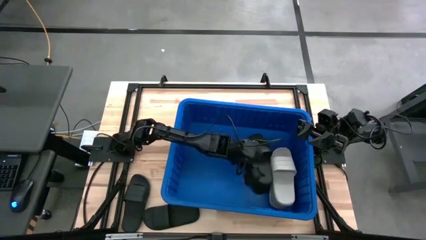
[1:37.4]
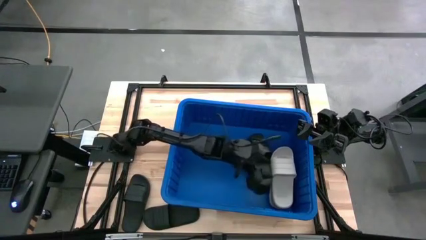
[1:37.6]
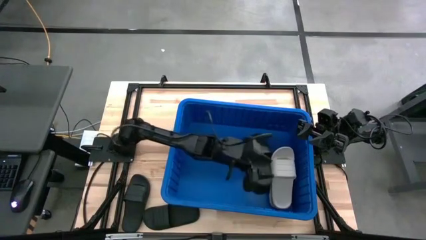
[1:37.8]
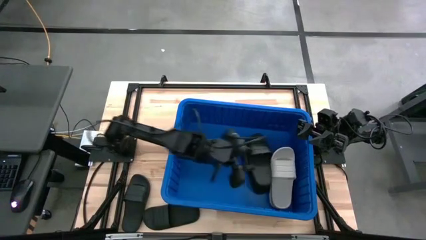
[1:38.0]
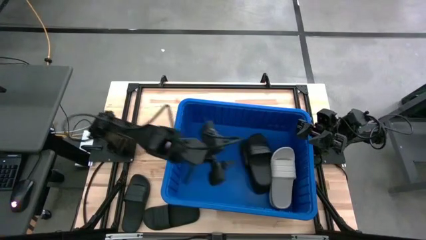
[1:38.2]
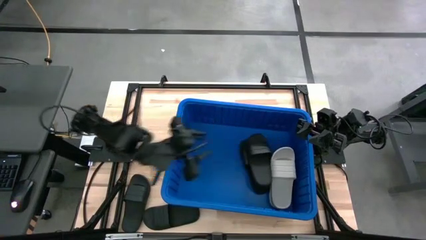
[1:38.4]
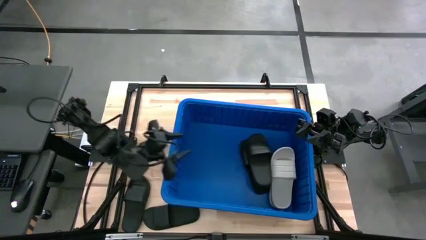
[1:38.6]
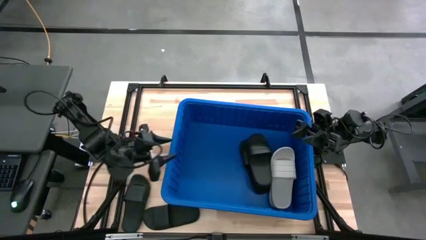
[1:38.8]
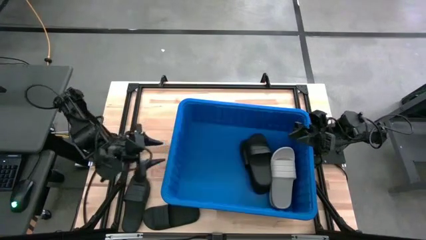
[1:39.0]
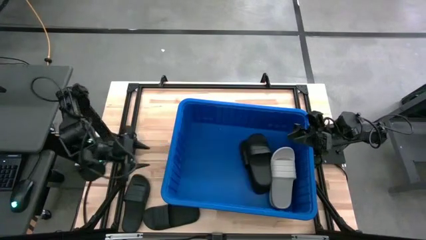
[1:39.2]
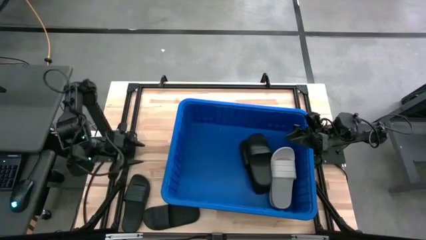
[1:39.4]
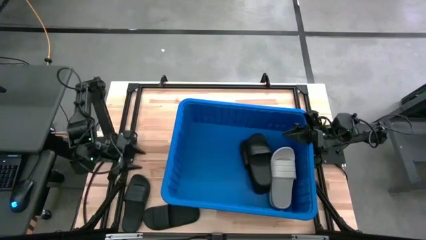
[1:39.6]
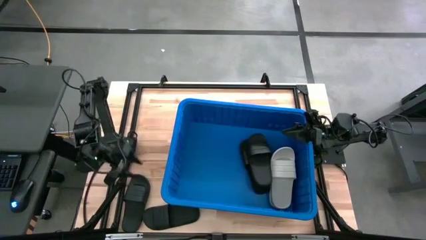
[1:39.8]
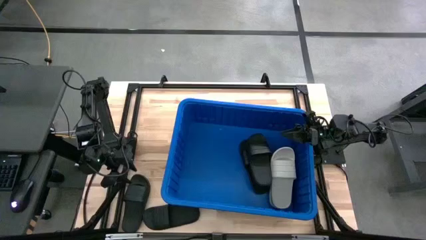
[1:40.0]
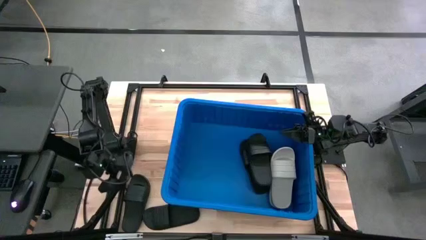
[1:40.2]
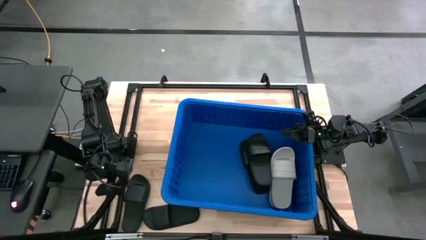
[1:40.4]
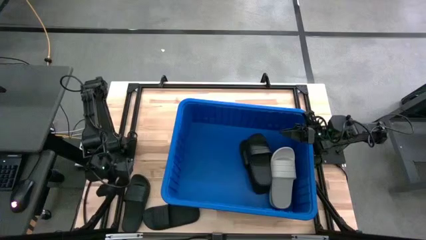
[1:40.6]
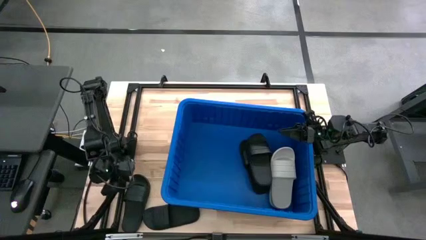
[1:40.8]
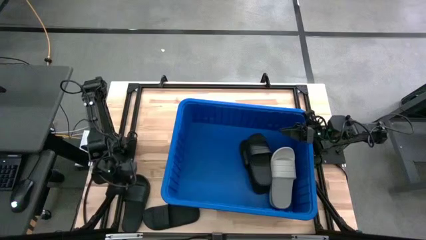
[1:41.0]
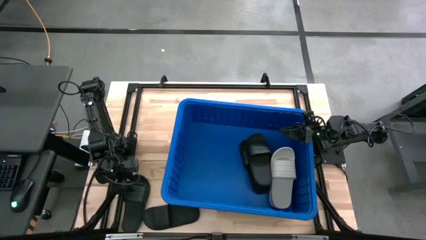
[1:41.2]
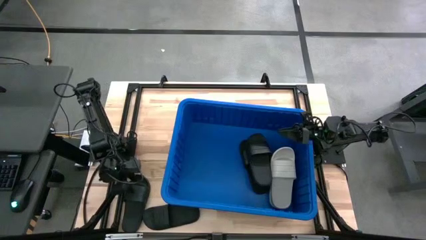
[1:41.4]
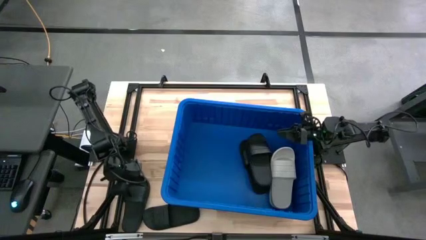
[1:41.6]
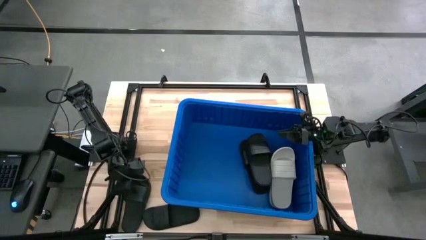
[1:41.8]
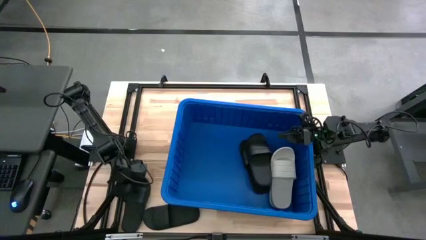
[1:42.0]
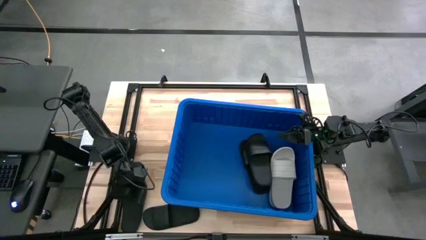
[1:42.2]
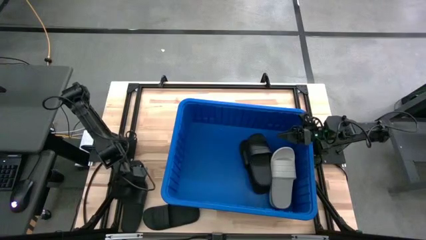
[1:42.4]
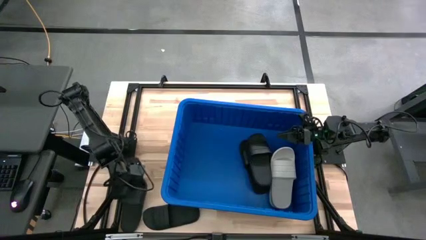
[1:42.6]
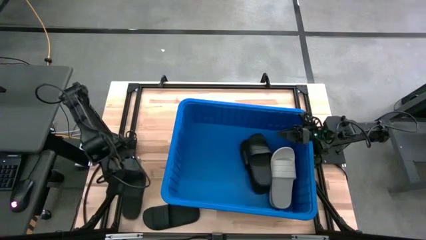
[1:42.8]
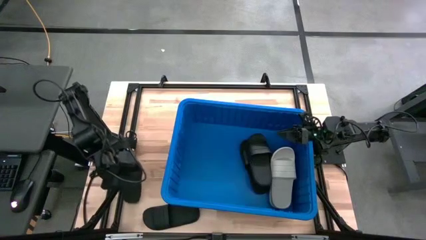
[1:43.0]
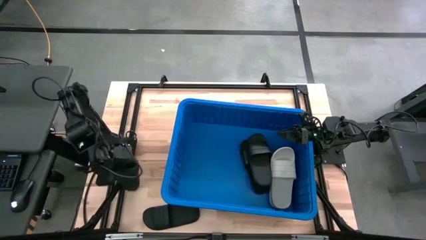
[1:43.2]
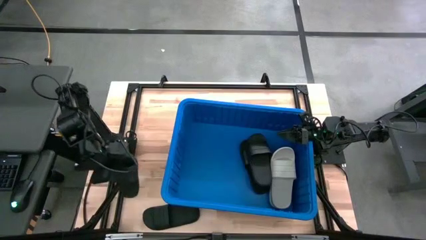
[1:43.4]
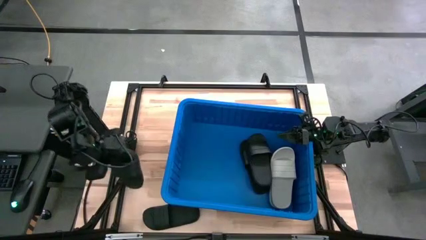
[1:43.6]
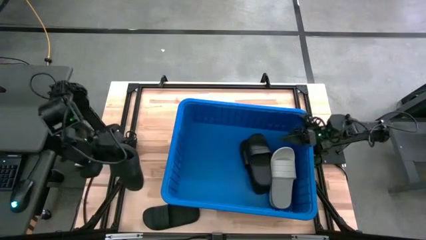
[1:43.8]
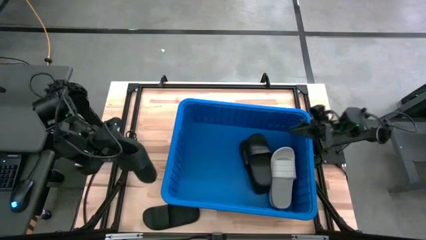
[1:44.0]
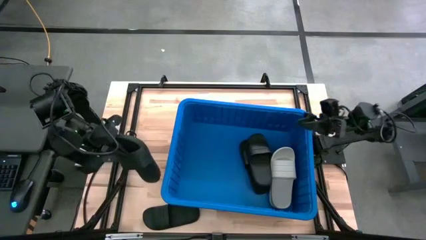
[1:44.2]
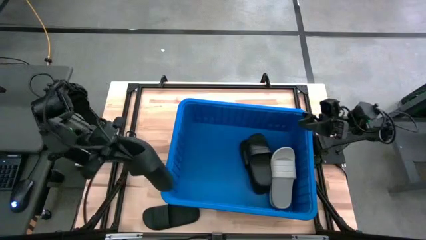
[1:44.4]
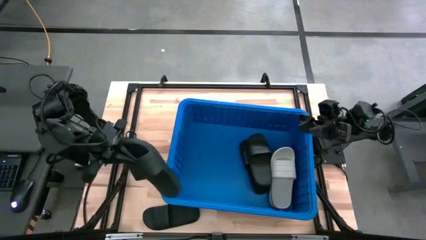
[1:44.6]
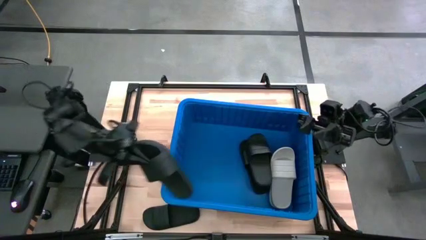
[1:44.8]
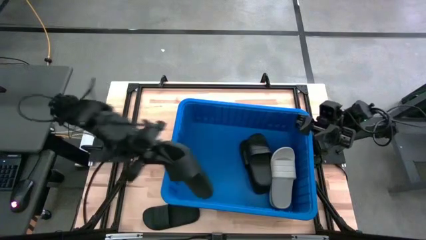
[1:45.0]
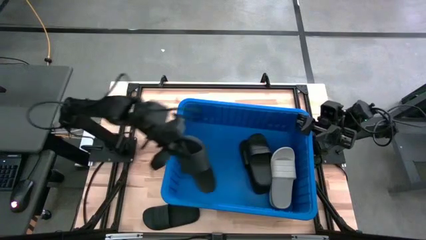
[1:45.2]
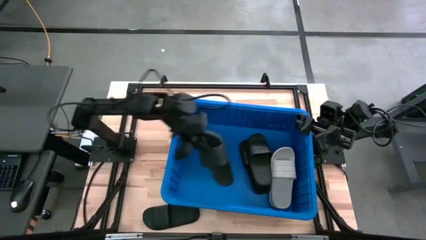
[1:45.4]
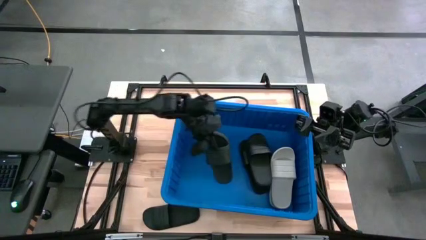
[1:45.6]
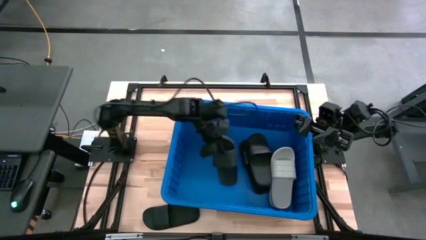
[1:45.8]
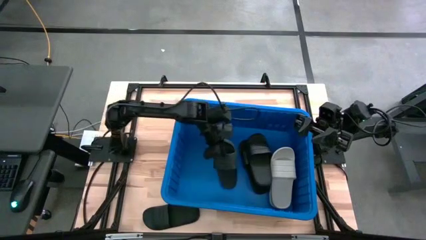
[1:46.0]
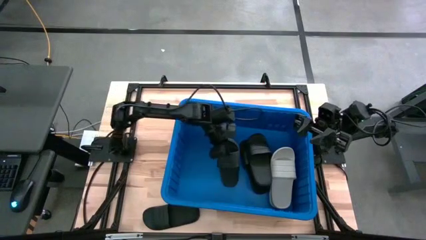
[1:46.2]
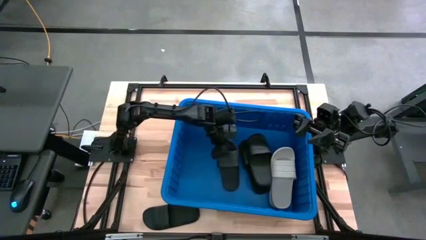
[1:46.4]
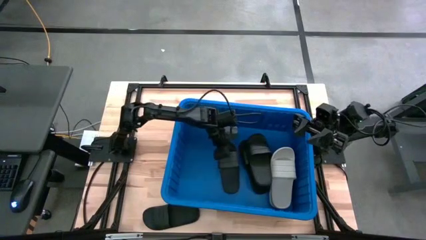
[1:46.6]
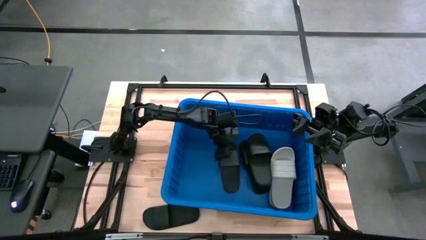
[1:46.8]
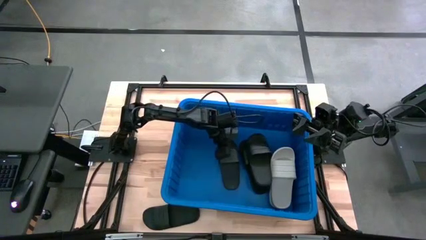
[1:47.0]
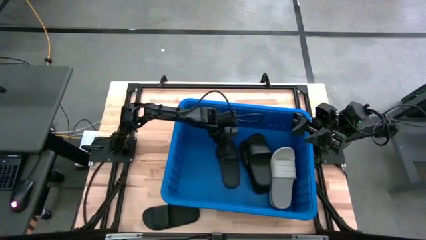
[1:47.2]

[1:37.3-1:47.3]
Task: Pick and place slides into bin
Put the black slide into the blue organizer bin
